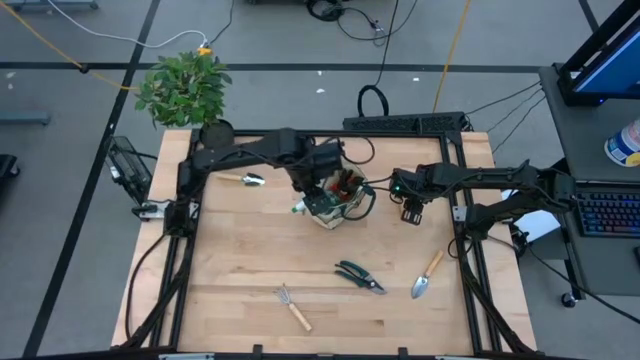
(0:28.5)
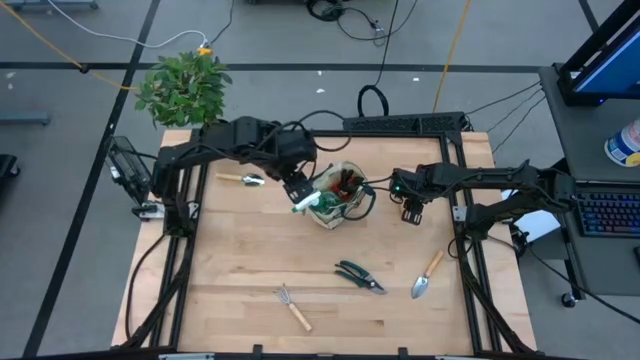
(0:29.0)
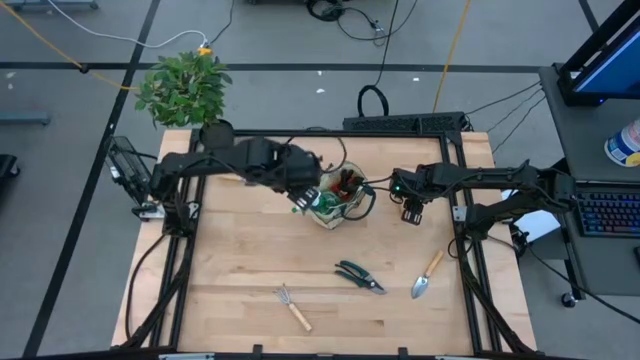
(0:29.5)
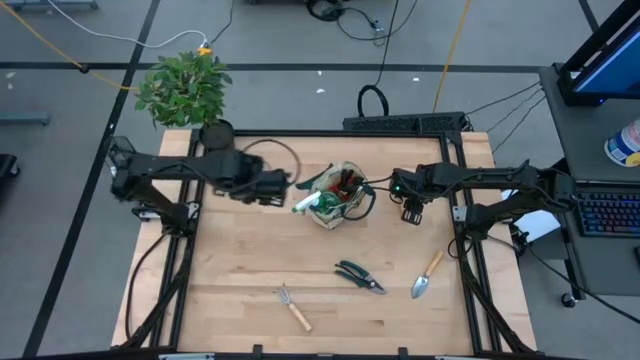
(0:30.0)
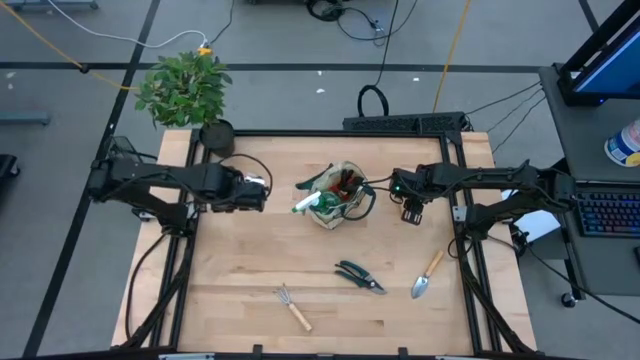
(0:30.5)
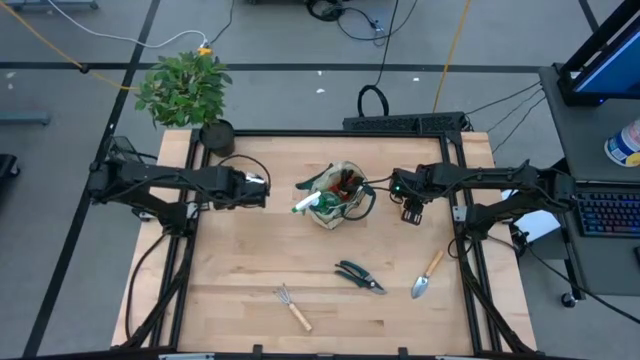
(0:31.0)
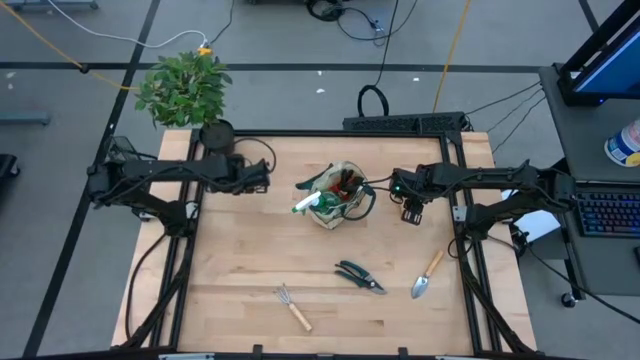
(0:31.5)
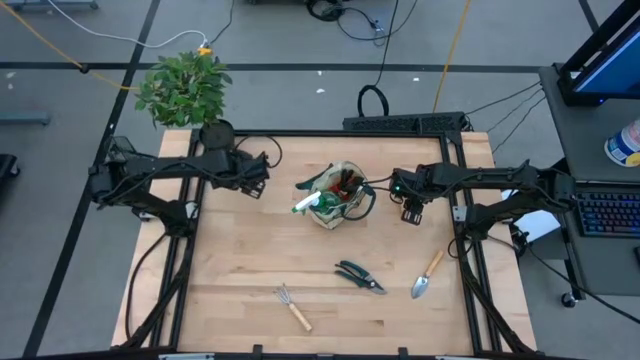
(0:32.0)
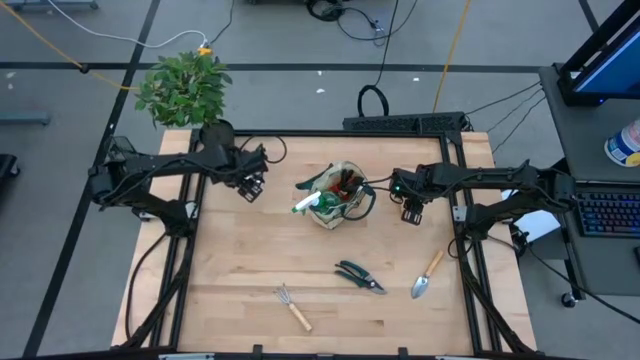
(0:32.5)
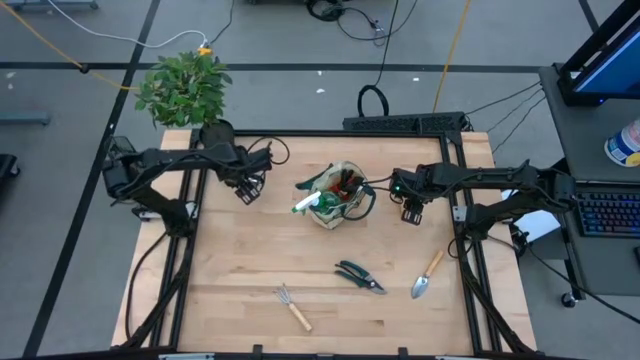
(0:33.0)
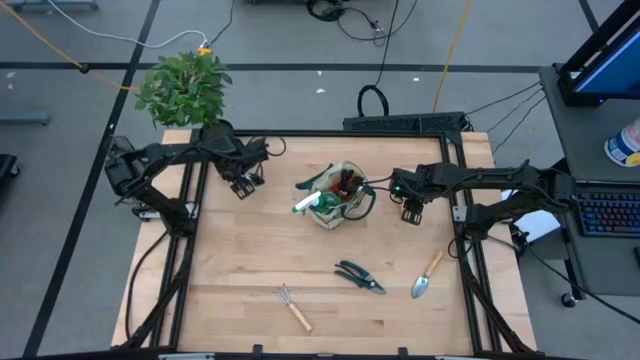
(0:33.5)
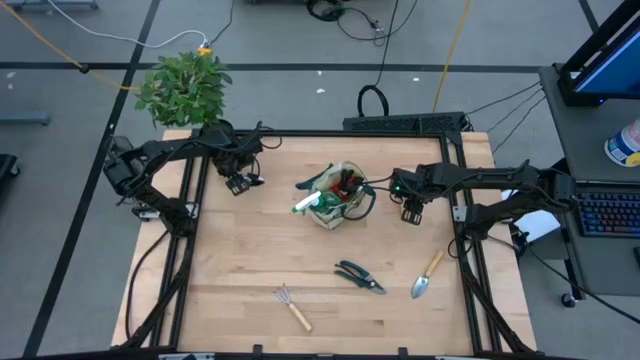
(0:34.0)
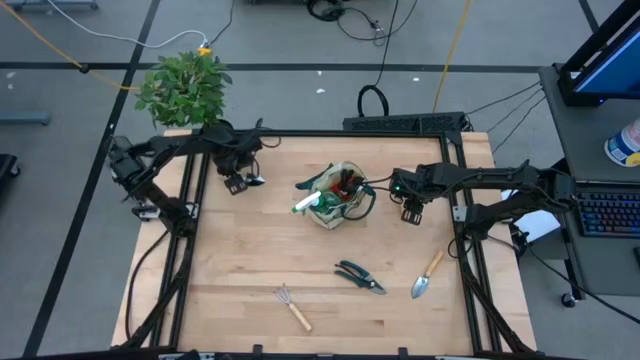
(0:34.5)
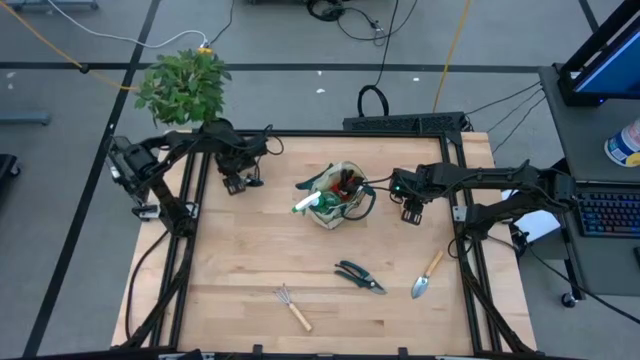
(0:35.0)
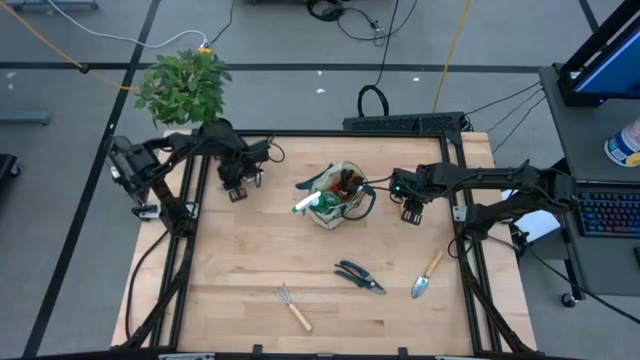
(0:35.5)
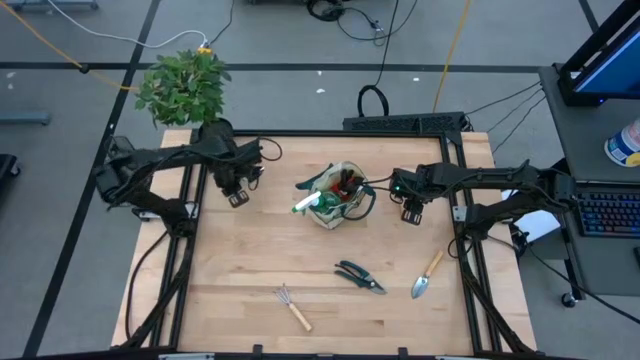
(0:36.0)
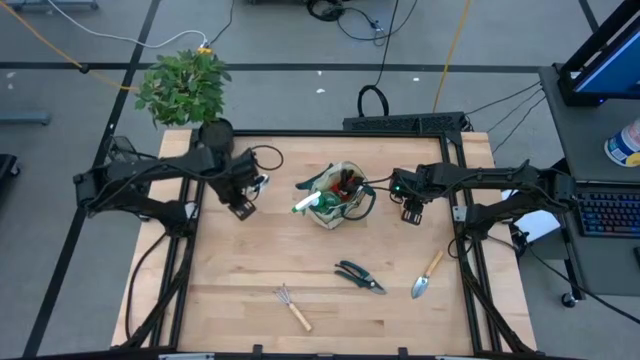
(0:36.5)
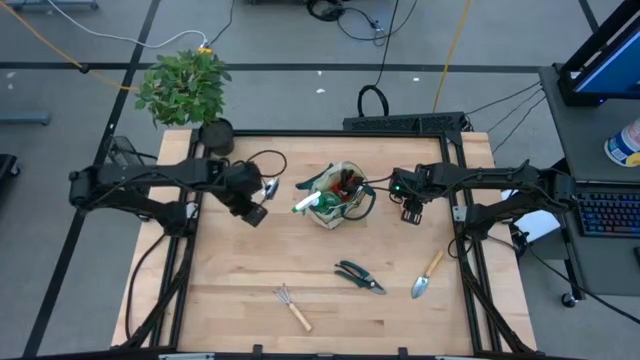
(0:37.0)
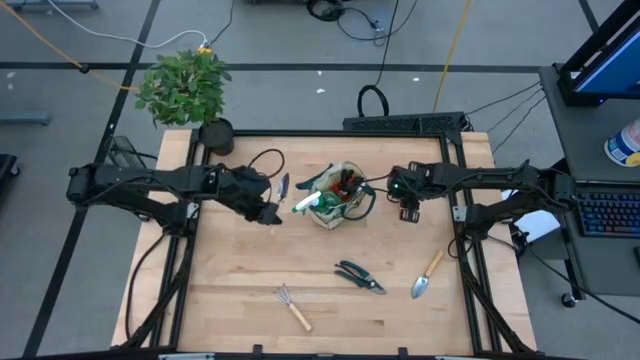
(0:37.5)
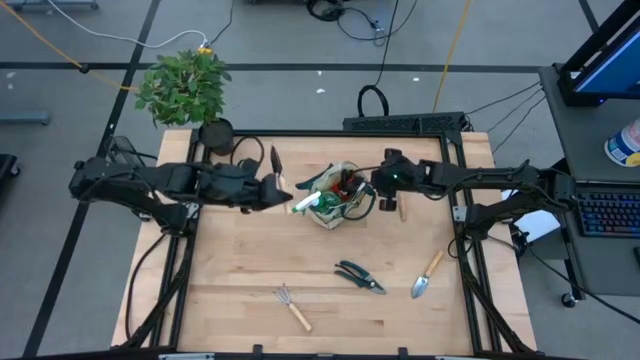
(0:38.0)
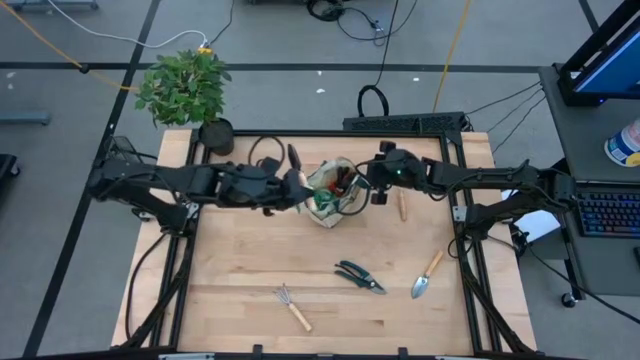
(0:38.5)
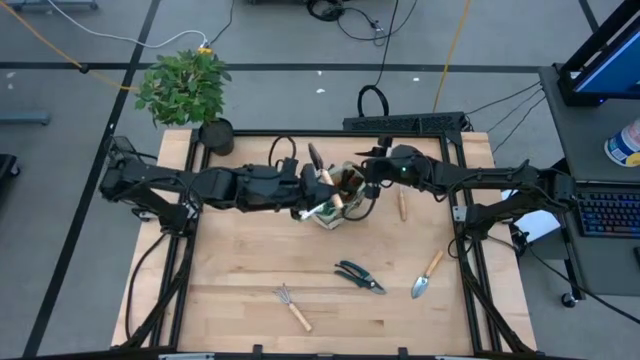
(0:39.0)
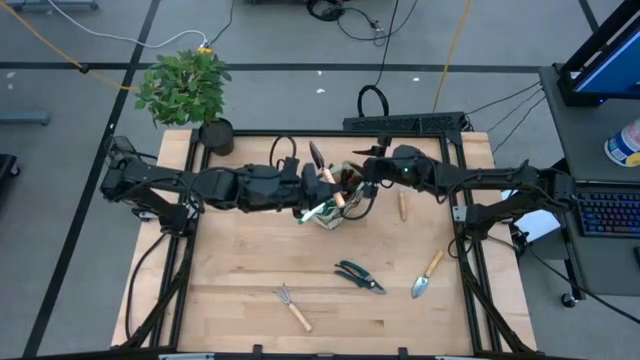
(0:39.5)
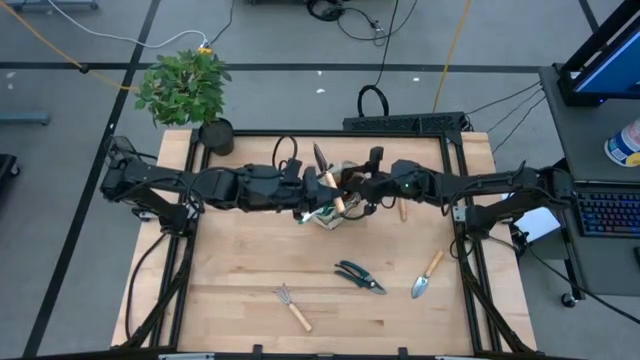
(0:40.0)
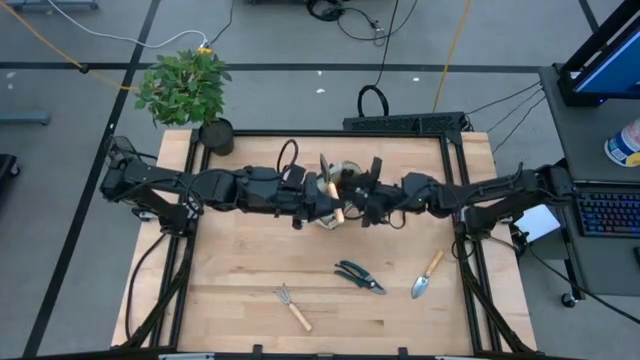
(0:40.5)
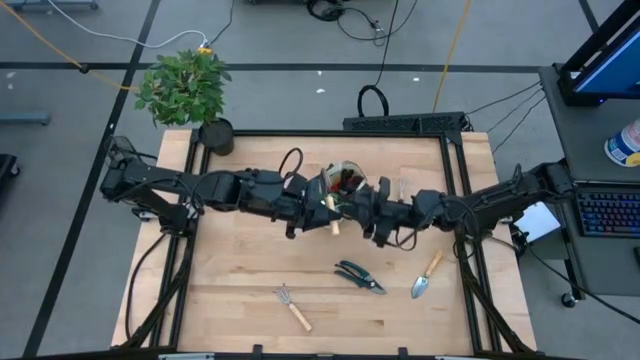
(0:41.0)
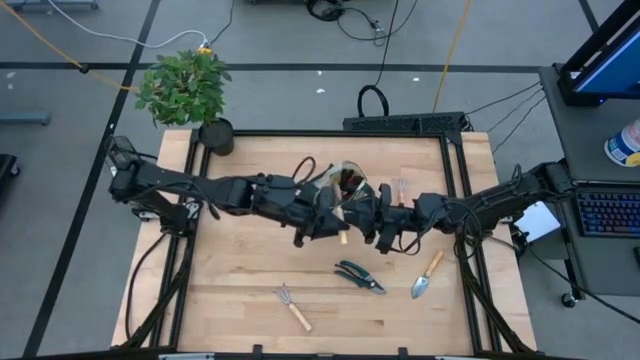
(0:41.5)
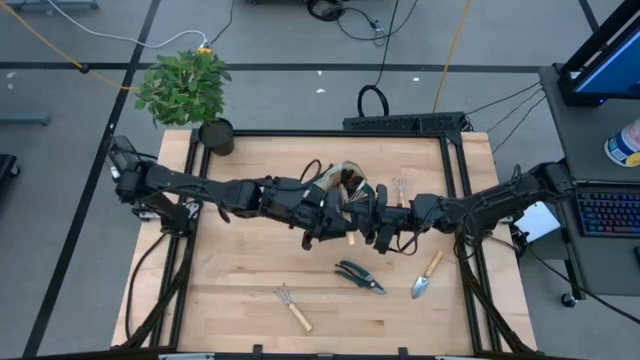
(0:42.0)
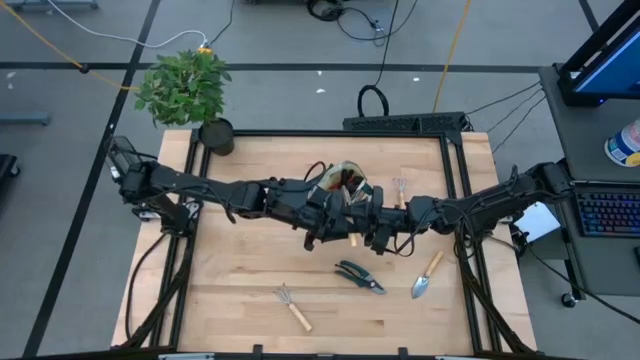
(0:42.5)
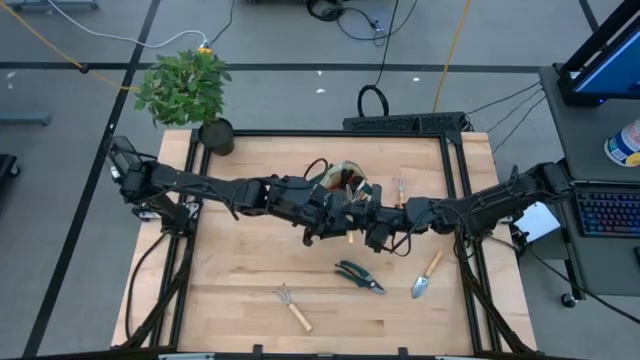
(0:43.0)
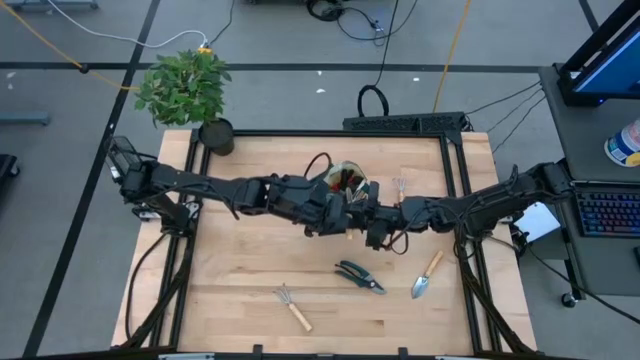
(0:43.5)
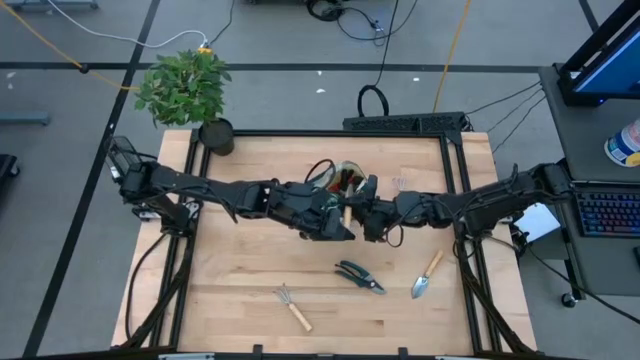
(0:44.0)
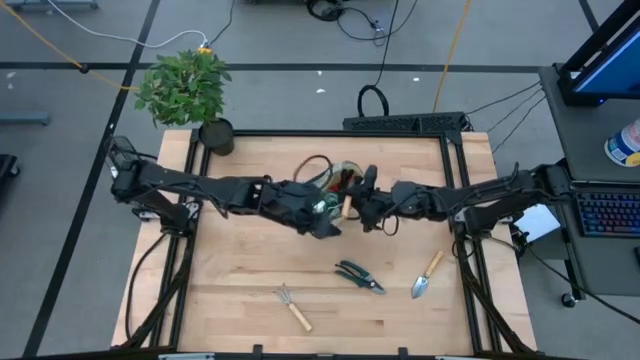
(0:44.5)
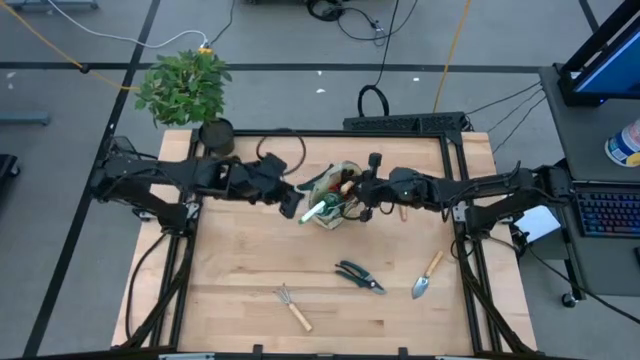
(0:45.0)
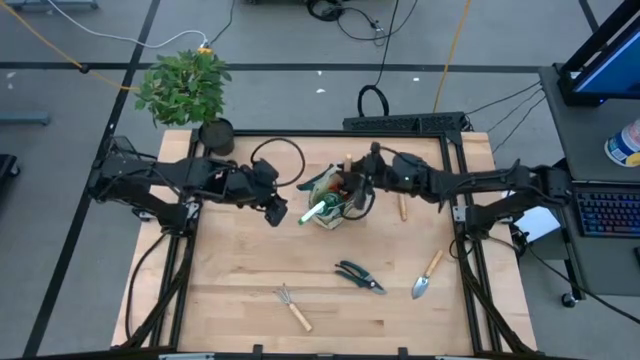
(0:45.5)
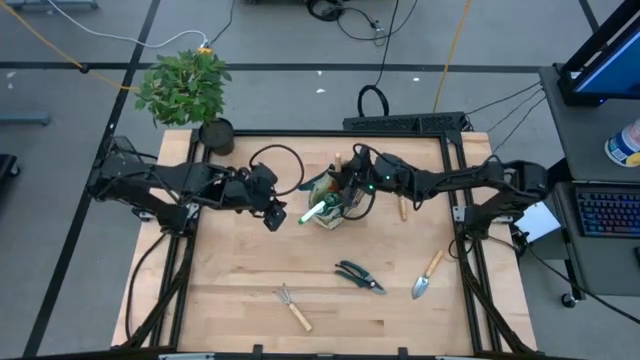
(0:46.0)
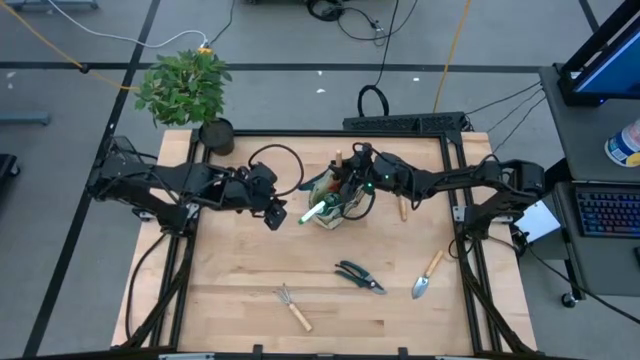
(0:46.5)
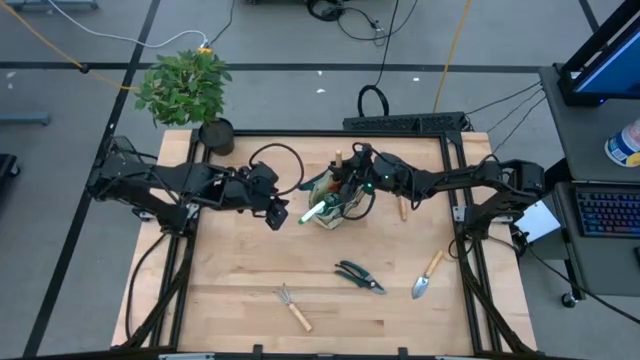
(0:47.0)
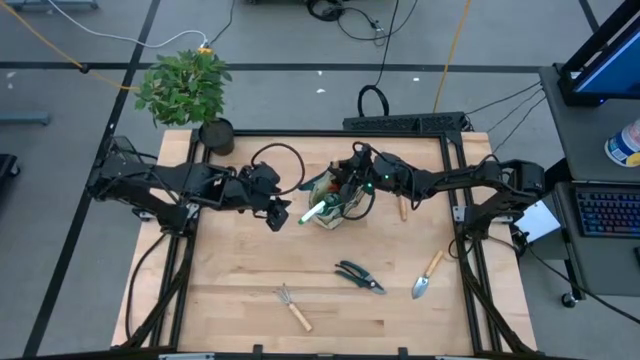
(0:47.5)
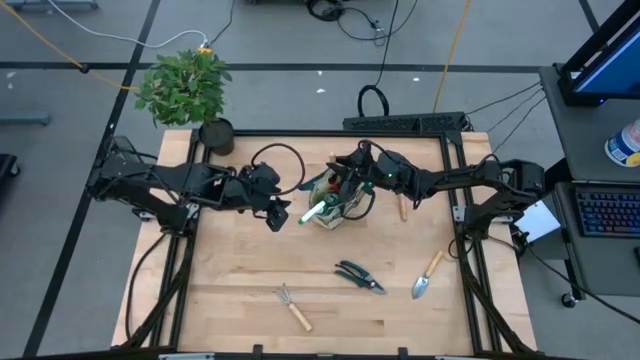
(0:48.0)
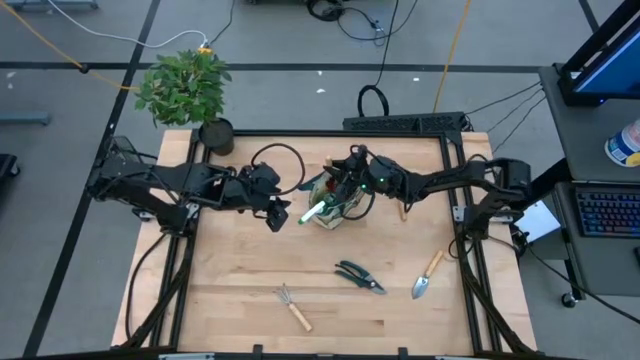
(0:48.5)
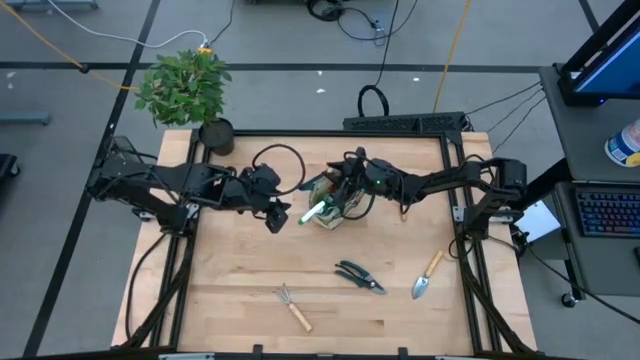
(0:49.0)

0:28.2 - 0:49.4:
Task: Pick & Place Garden tools in Gardening bag
Put the left light brown trowel into the light brown gardening bag
